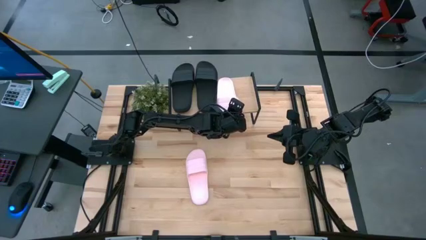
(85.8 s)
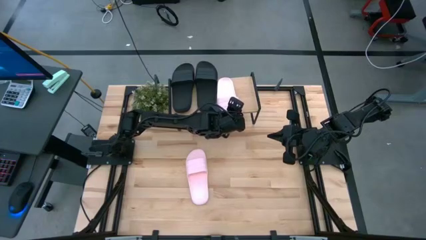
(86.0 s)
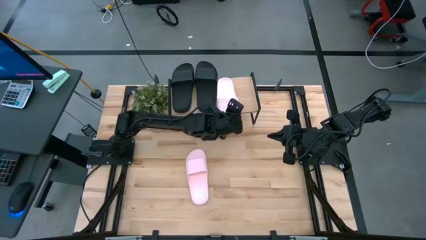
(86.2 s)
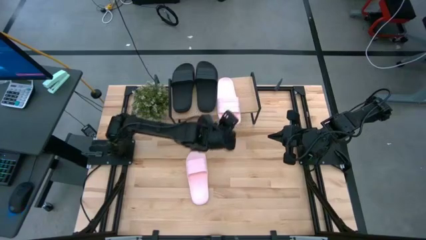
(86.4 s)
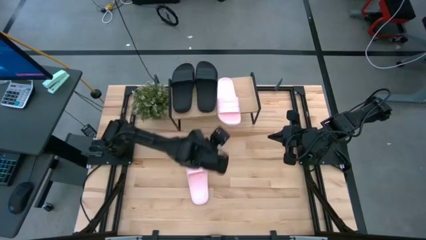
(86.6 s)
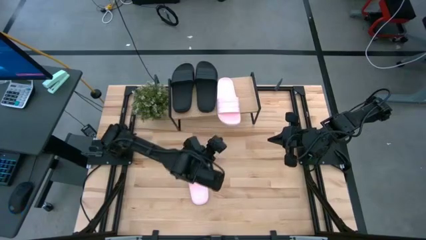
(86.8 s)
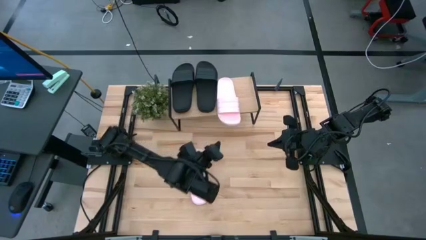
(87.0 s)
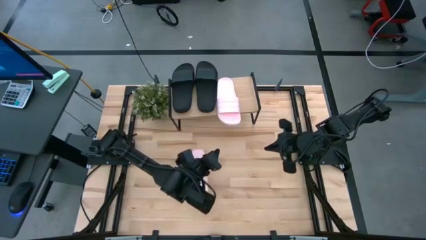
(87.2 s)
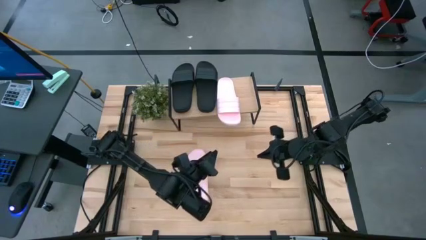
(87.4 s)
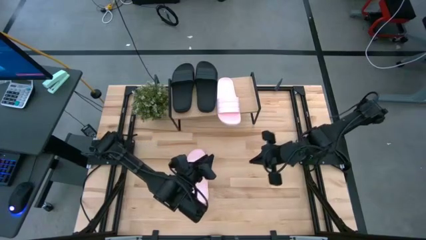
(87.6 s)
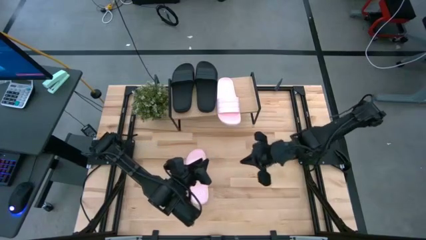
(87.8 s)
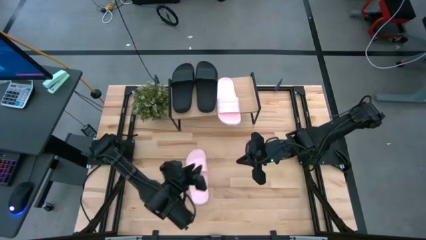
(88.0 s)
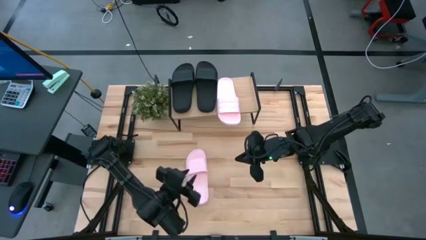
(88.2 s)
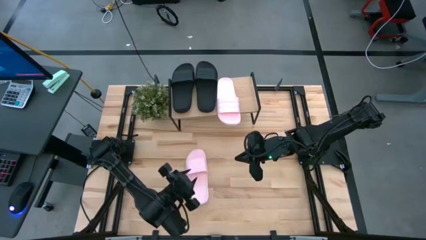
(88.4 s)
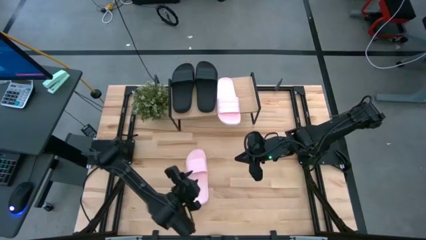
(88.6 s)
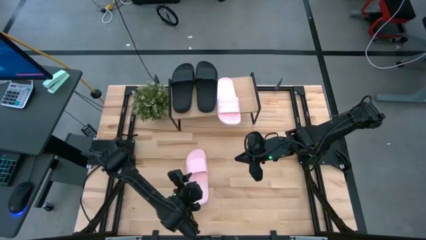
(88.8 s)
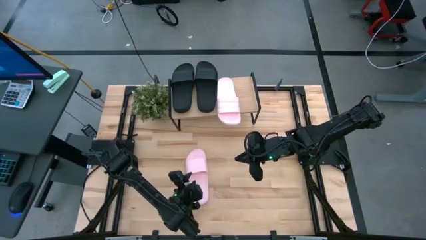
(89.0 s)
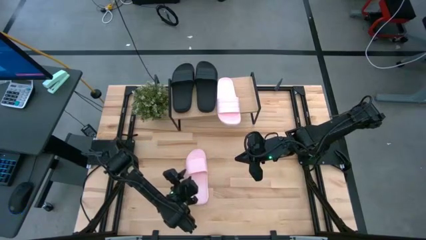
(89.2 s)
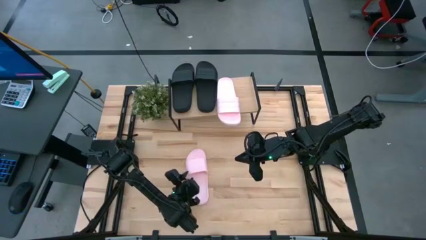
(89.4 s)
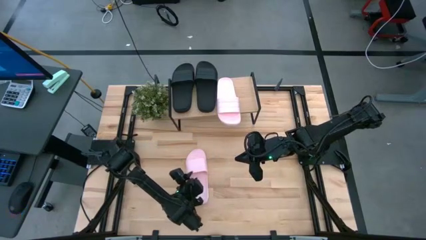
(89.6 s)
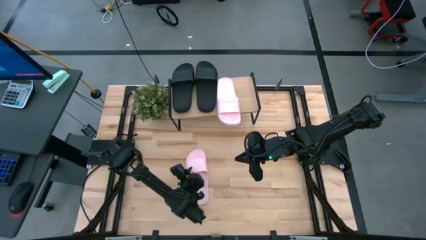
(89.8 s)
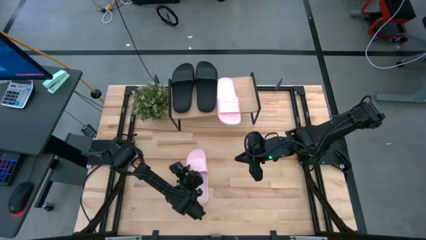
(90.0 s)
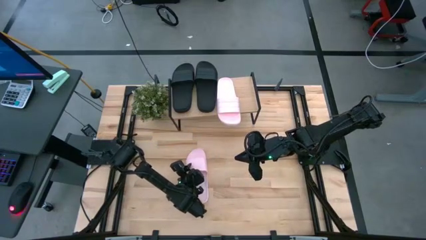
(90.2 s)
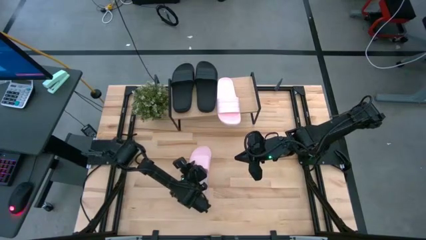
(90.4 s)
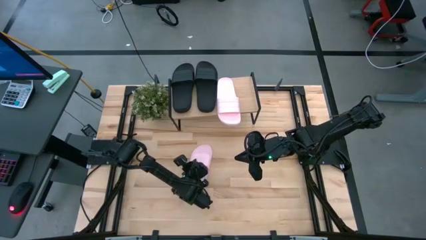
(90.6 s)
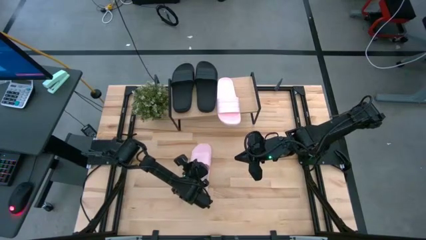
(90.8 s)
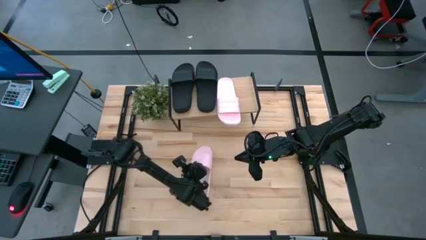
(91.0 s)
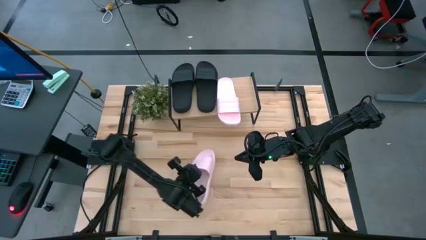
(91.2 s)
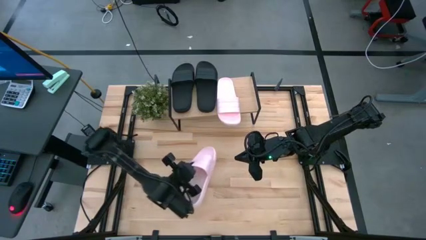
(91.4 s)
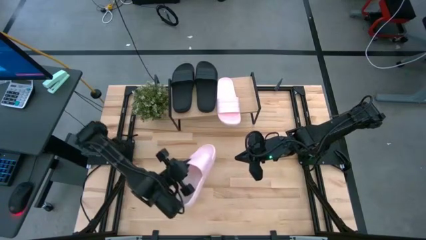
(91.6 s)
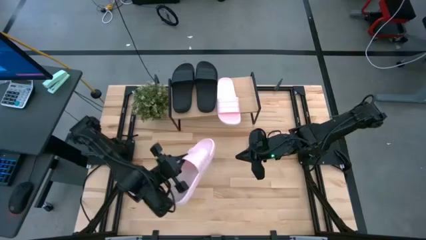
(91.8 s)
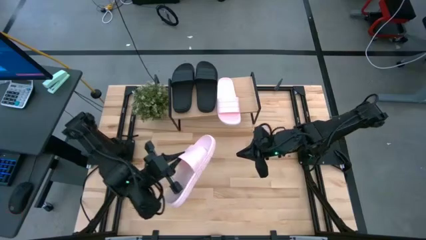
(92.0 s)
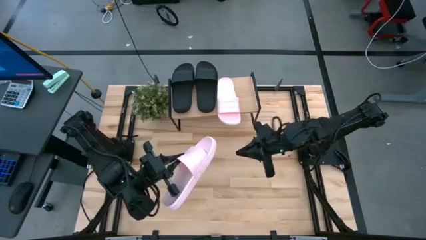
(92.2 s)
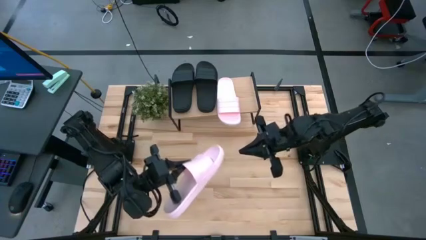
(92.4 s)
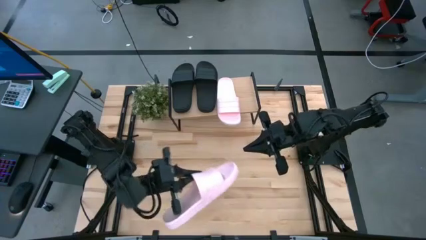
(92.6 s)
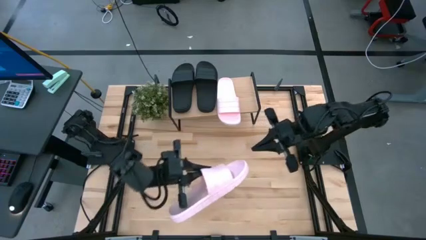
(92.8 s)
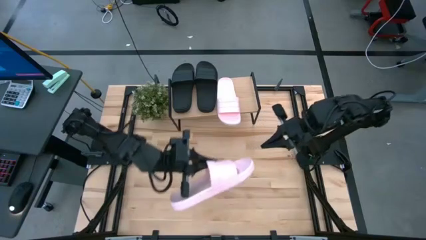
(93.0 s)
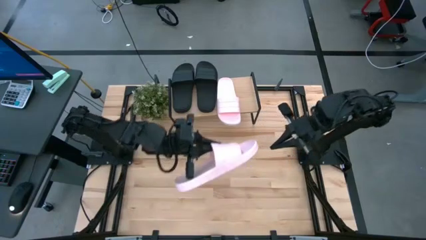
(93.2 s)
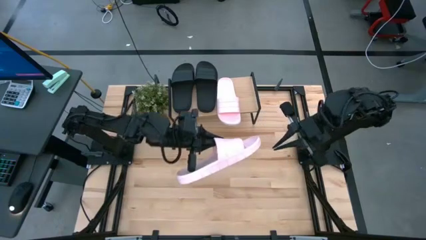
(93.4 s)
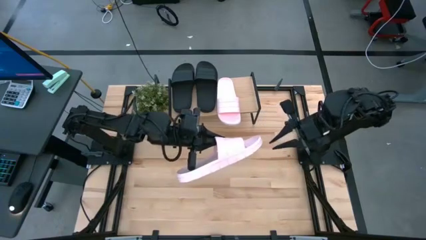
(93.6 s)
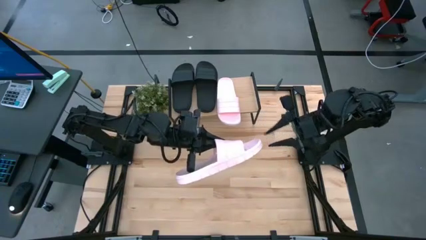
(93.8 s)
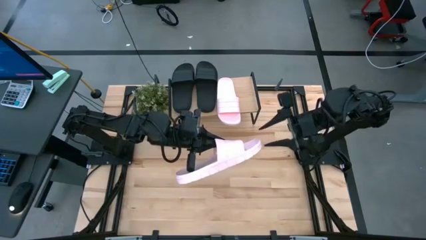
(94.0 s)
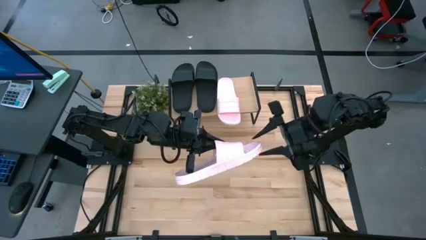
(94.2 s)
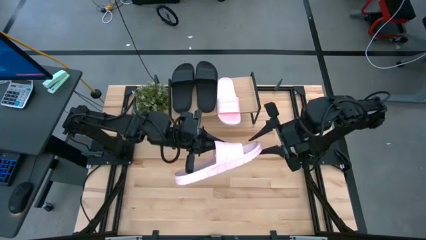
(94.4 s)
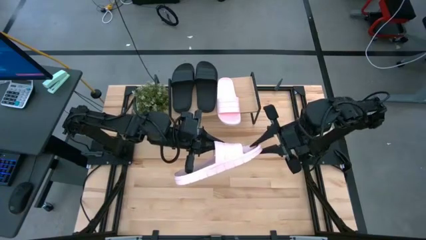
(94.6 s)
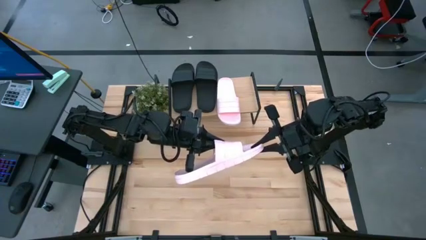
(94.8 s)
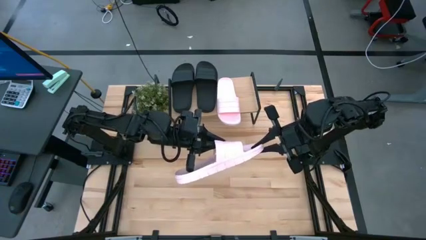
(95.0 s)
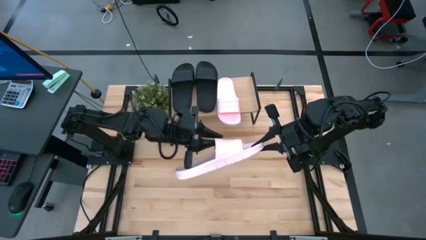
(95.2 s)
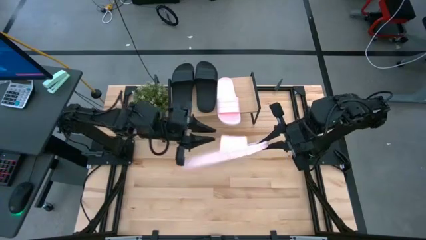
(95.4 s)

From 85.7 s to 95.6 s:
Task: Pick and place slides into the shelf
Put the pink slide on the shelf

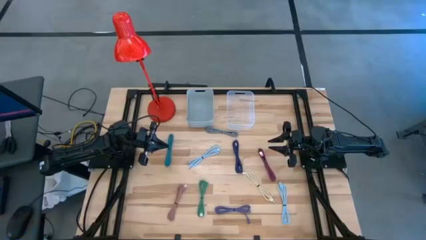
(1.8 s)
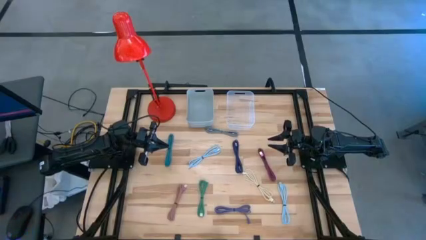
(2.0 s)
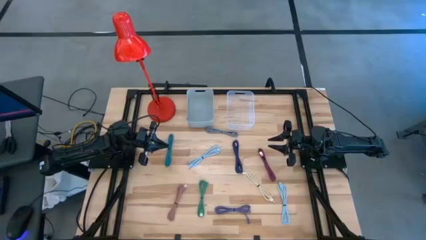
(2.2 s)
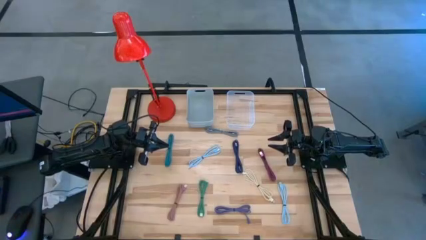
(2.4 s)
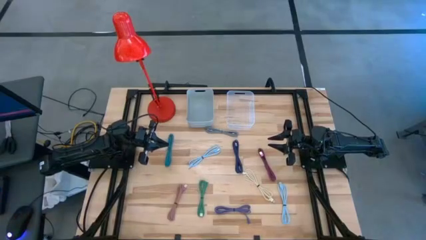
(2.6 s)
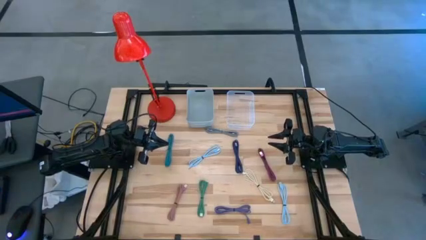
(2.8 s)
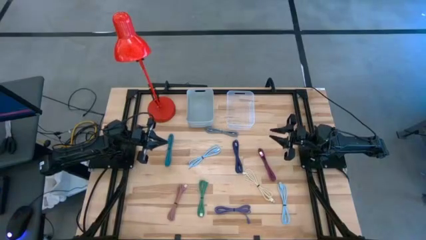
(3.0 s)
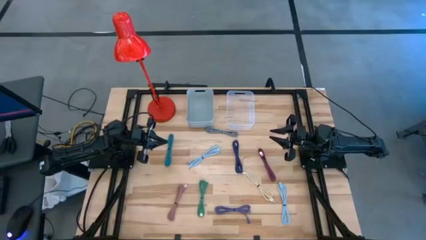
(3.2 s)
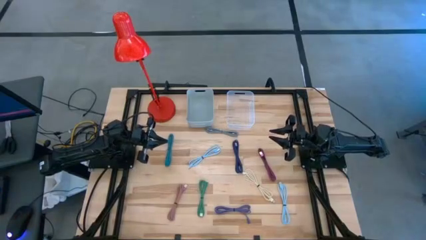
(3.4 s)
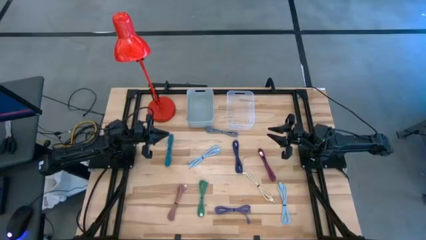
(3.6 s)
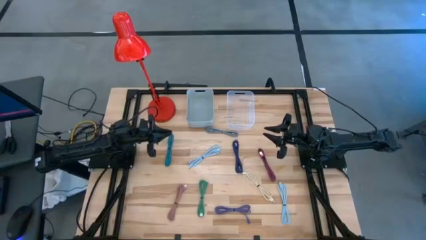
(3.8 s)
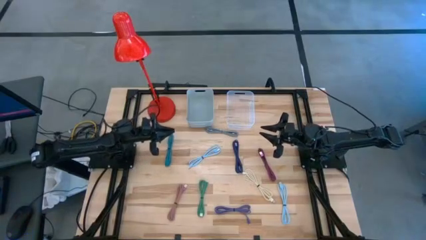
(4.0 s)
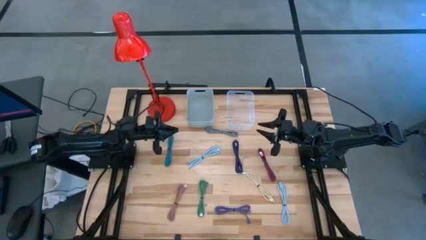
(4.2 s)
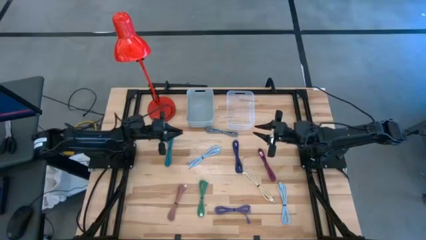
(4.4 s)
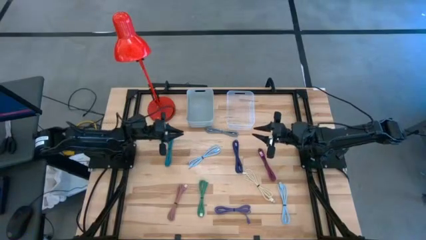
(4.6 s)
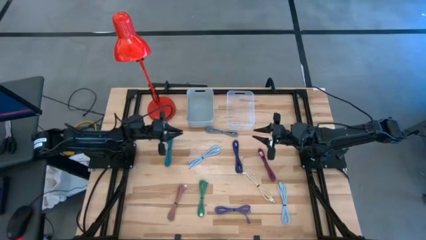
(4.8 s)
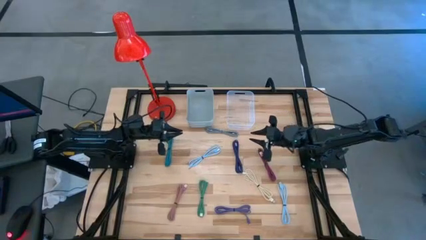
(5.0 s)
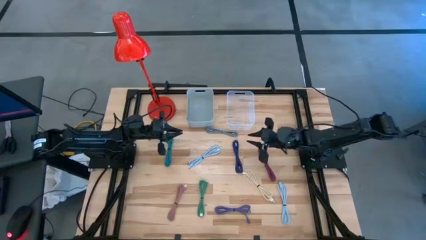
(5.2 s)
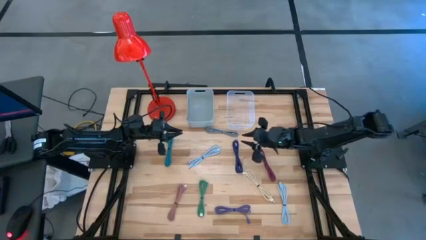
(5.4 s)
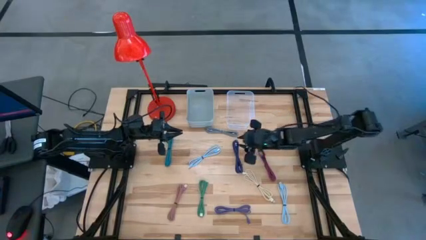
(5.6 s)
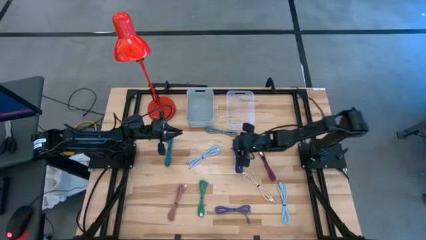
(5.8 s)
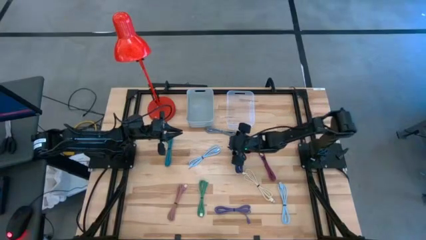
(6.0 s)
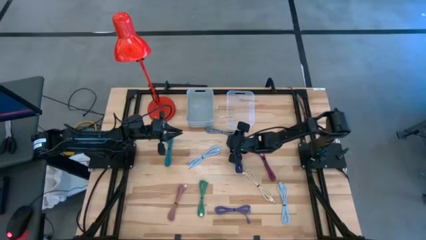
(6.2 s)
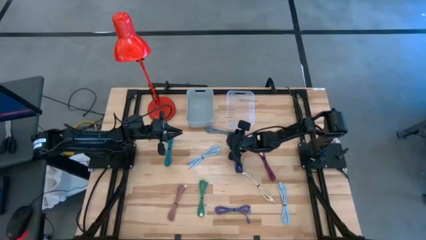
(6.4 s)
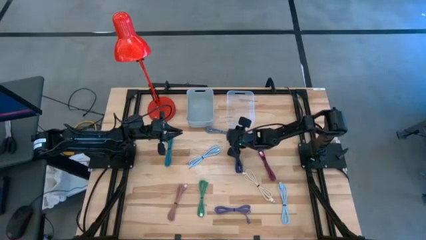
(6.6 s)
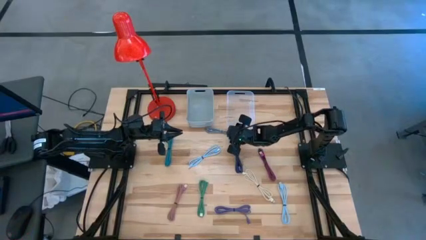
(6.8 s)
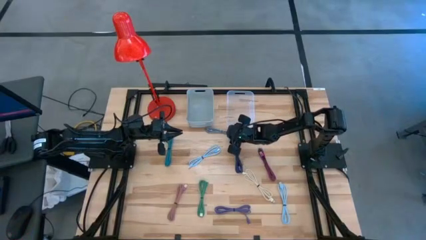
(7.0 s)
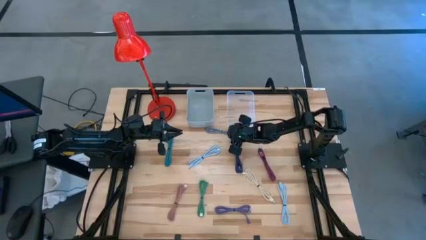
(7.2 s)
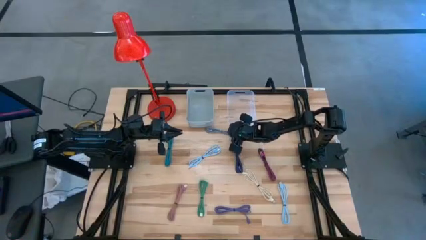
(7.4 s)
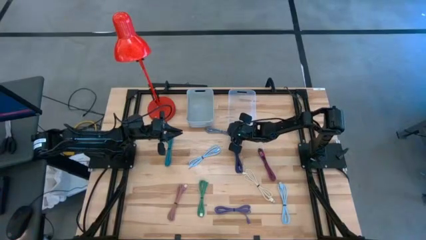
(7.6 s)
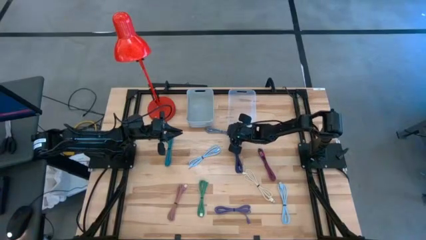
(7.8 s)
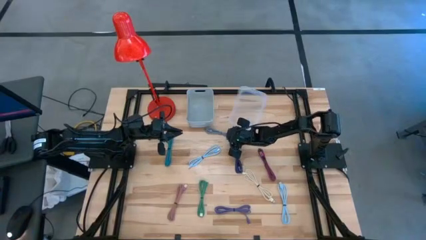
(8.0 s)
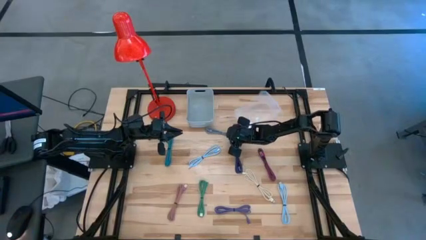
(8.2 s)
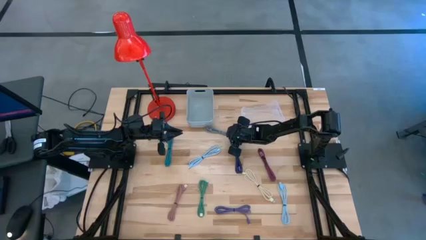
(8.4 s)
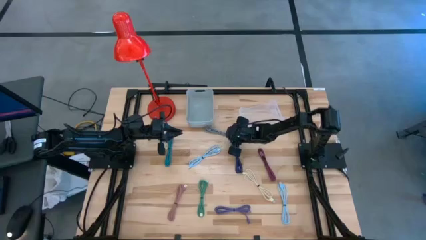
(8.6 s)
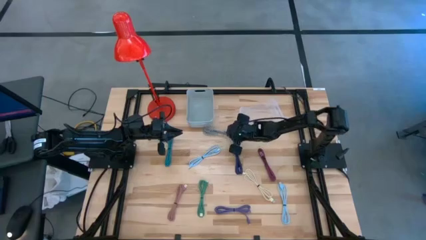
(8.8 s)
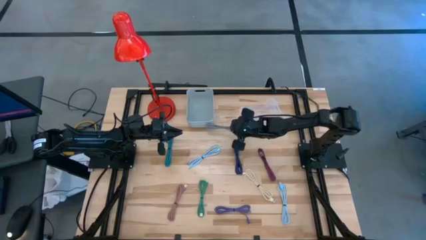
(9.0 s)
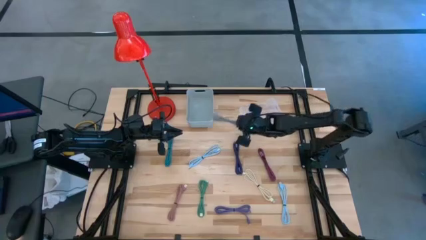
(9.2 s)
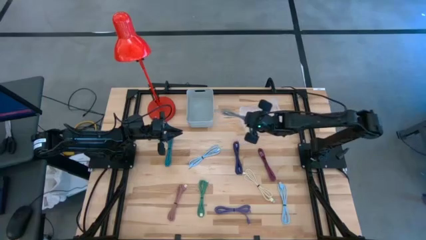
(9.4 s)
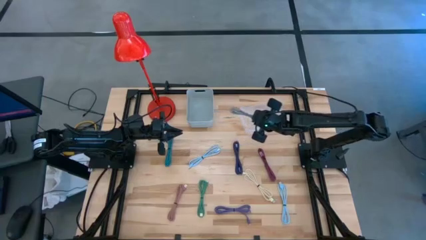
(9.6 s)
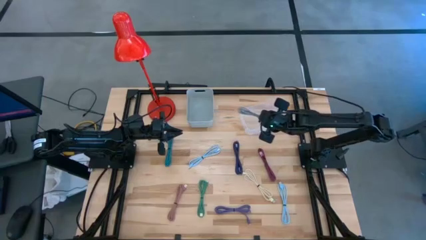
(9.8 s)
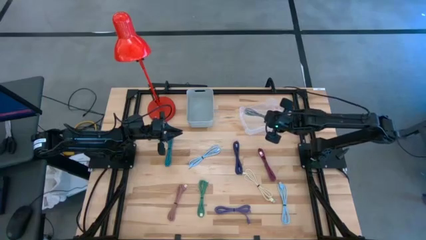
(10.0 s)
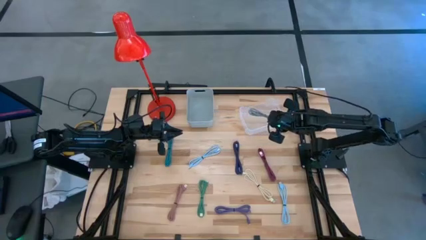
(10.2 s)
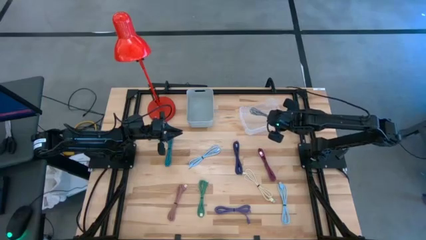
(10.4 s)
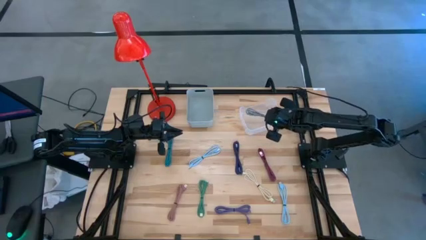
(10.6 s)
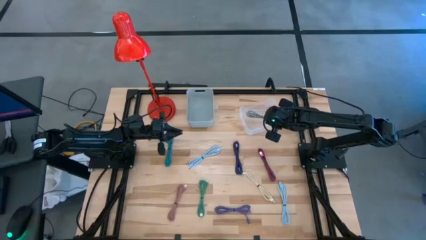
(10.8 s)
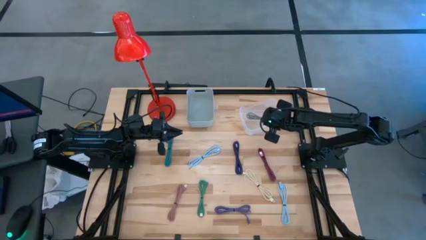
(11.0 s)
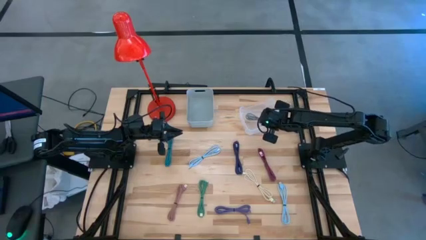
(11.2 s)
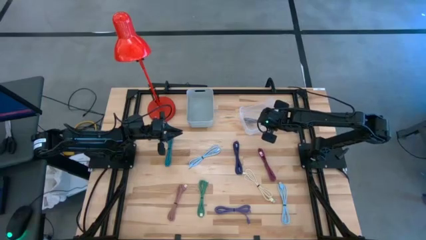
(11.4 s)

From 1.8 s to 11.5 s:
Task: Pick & Place USB Port
Put the gray charger cable into the transparent bin
